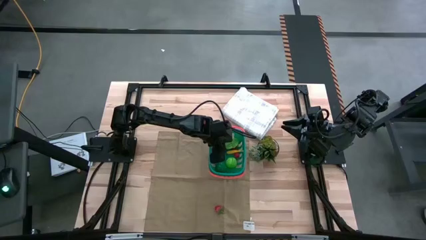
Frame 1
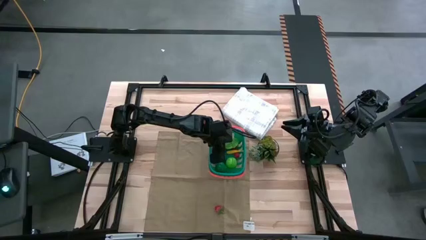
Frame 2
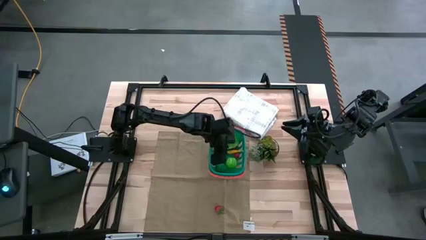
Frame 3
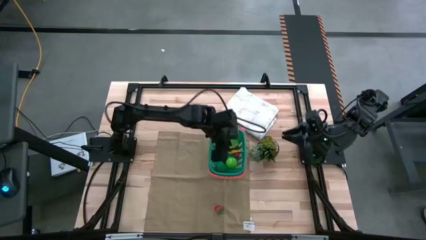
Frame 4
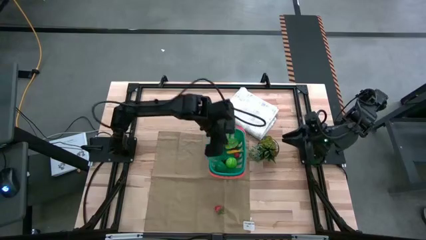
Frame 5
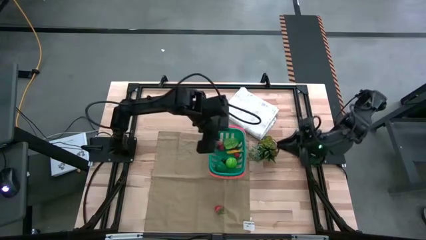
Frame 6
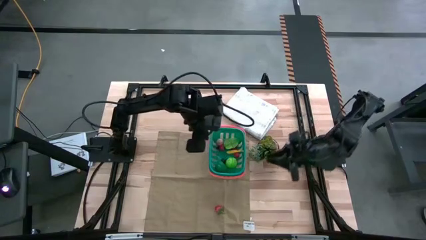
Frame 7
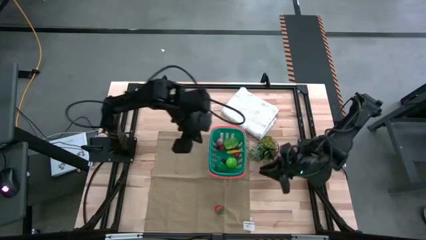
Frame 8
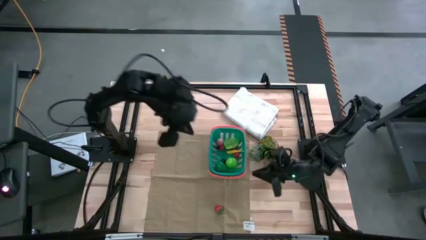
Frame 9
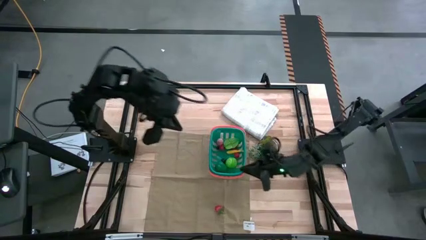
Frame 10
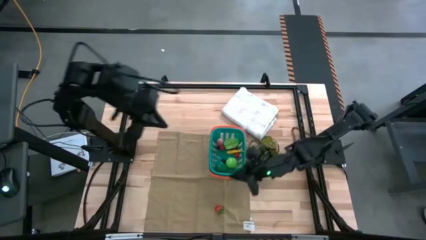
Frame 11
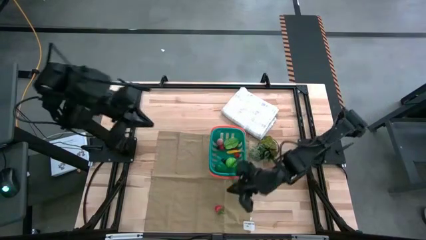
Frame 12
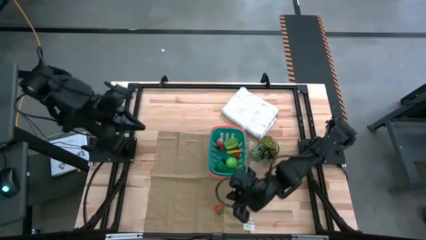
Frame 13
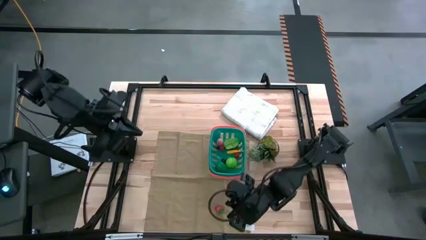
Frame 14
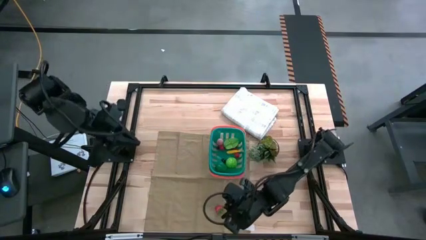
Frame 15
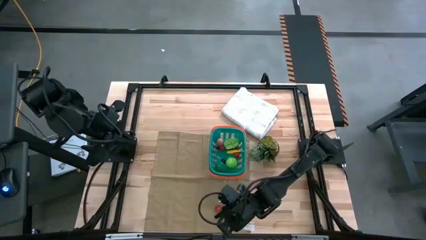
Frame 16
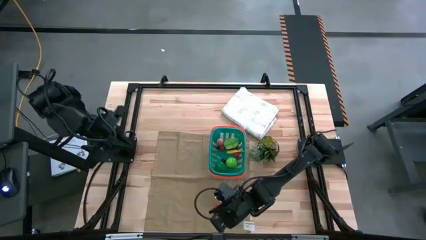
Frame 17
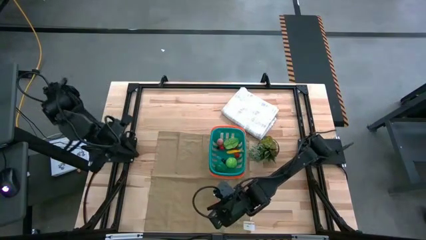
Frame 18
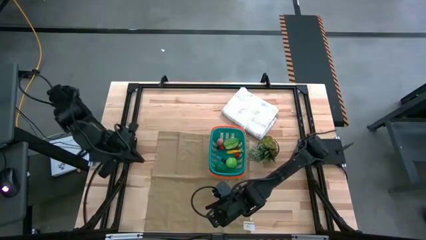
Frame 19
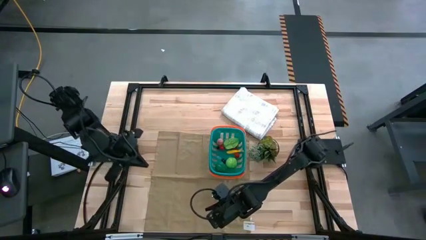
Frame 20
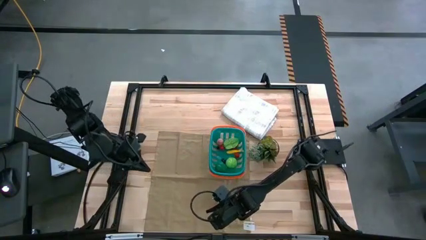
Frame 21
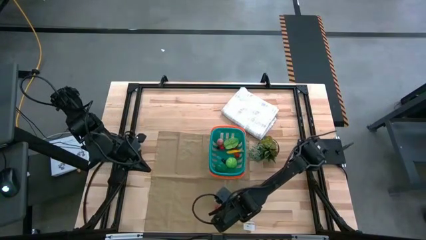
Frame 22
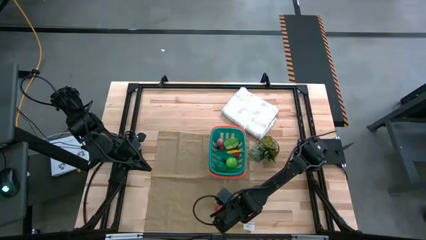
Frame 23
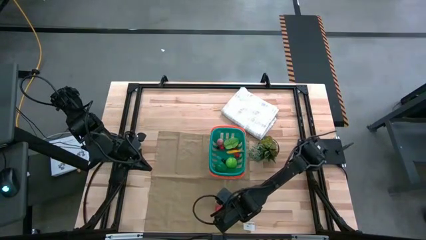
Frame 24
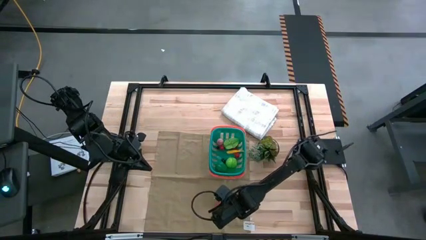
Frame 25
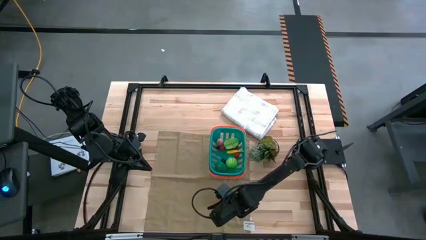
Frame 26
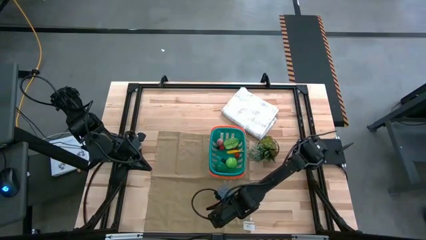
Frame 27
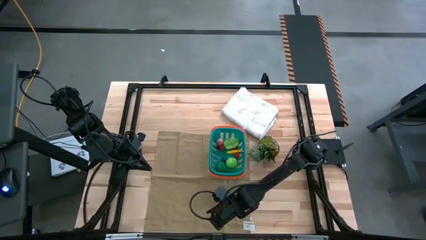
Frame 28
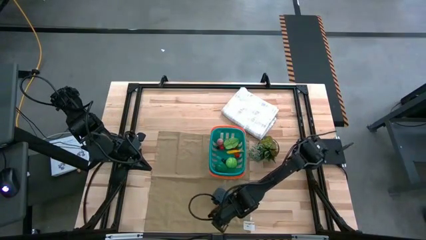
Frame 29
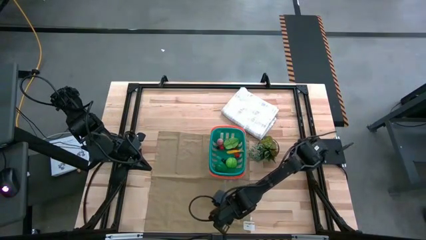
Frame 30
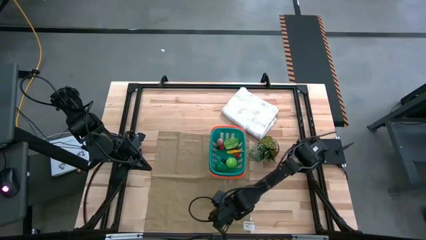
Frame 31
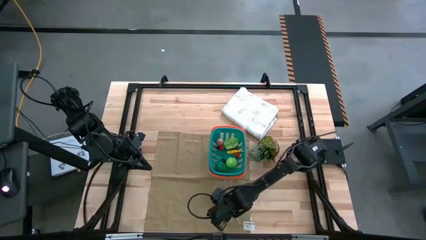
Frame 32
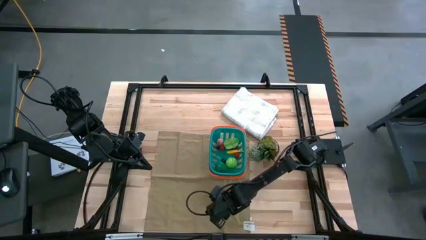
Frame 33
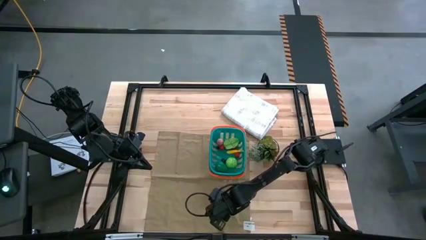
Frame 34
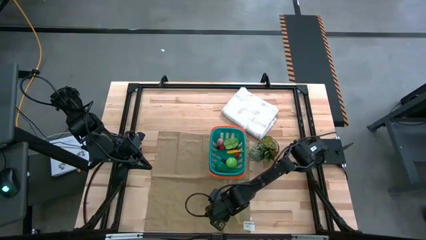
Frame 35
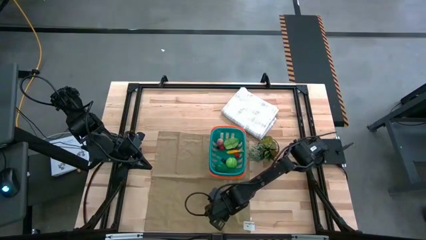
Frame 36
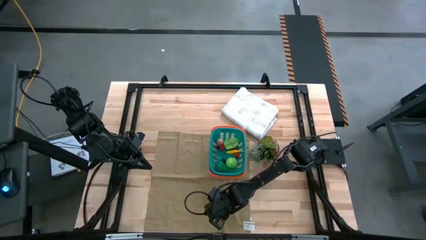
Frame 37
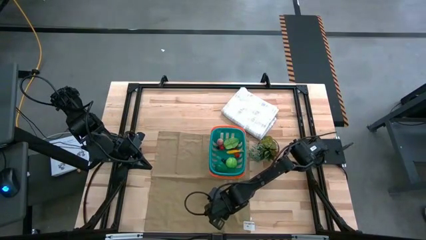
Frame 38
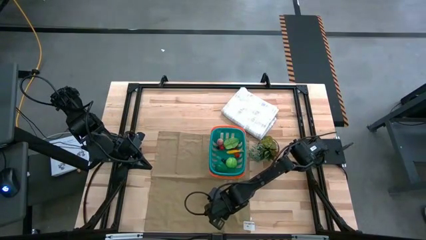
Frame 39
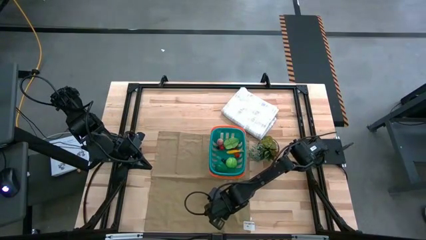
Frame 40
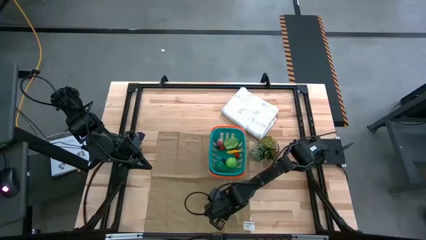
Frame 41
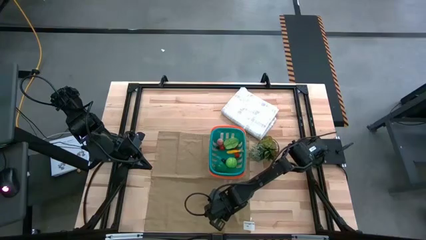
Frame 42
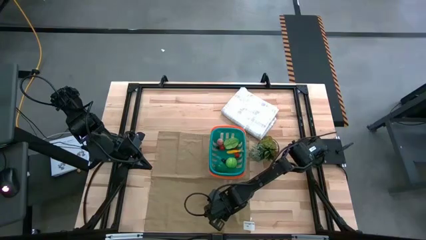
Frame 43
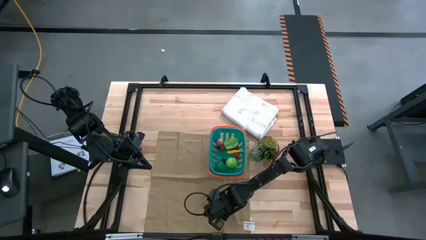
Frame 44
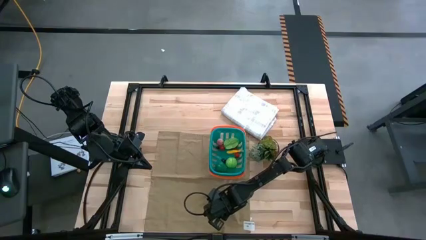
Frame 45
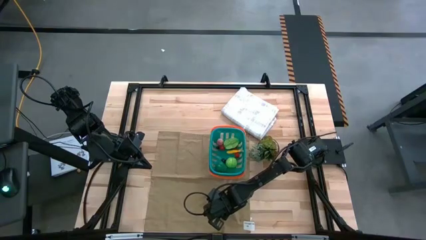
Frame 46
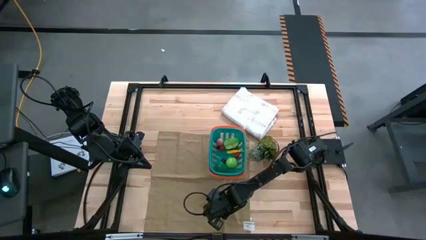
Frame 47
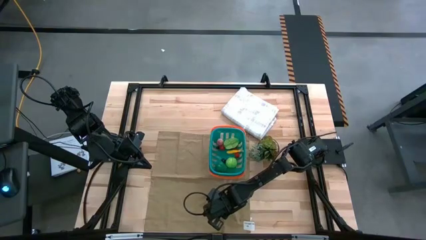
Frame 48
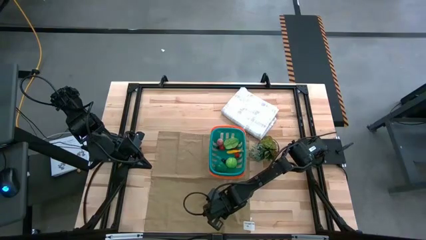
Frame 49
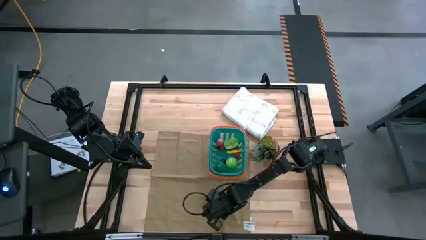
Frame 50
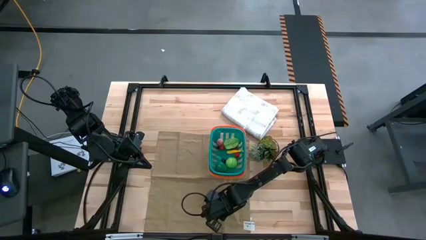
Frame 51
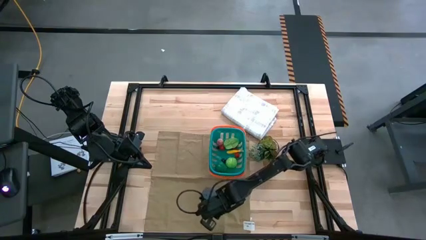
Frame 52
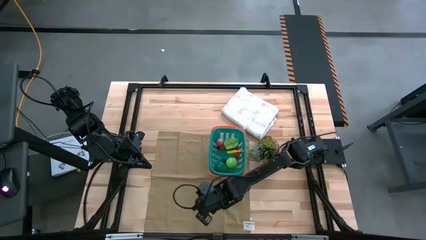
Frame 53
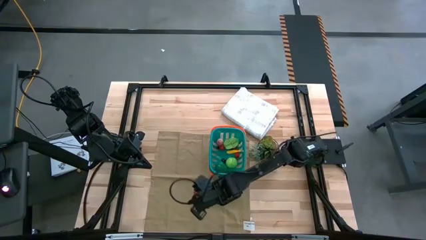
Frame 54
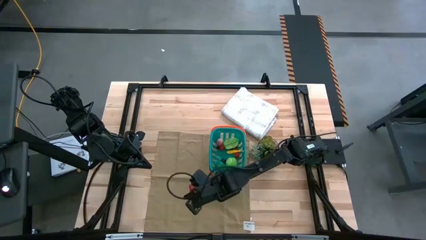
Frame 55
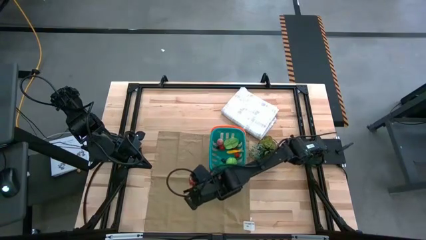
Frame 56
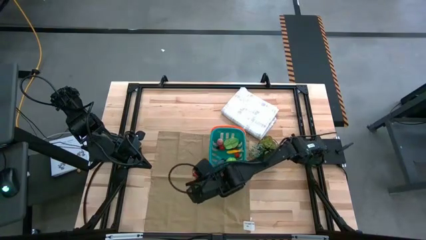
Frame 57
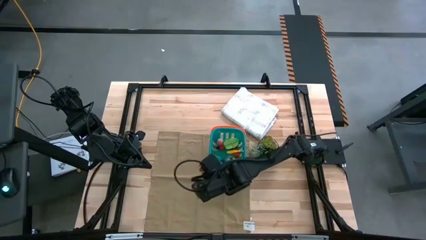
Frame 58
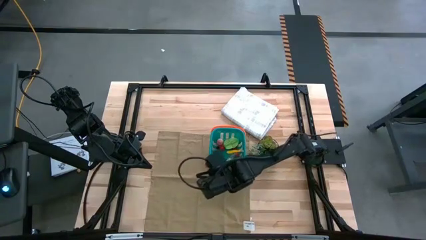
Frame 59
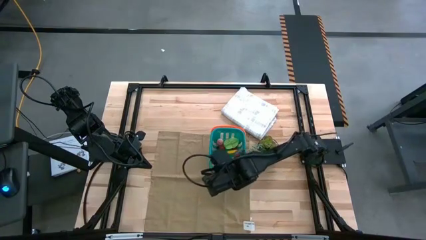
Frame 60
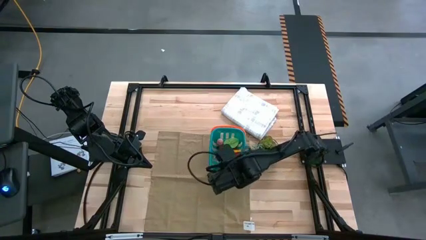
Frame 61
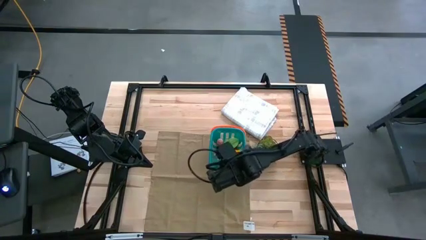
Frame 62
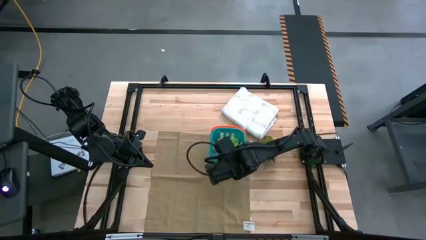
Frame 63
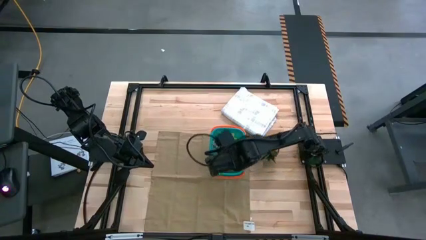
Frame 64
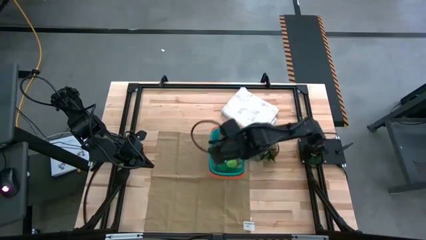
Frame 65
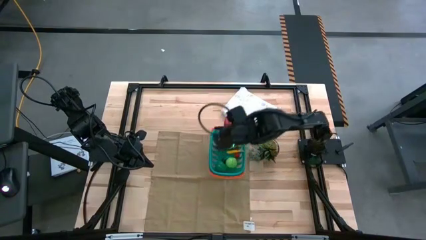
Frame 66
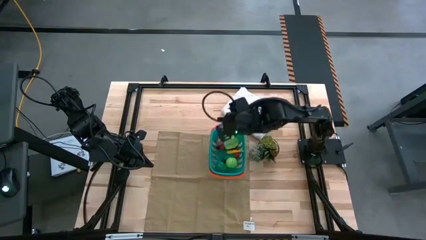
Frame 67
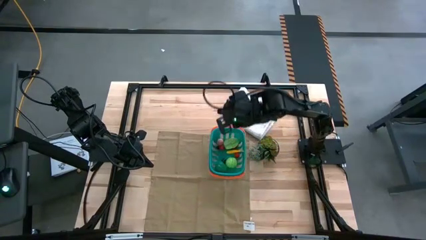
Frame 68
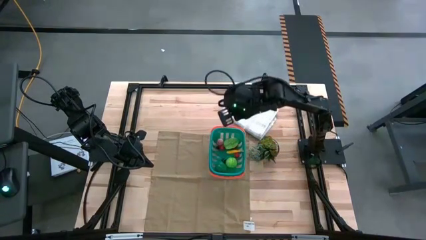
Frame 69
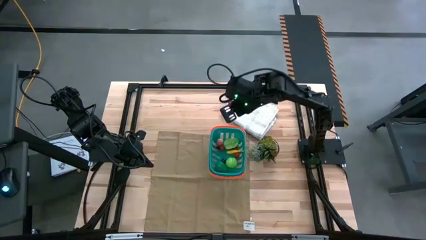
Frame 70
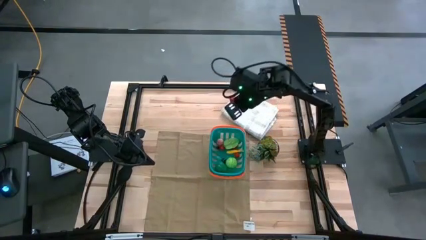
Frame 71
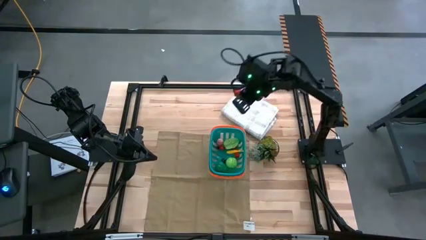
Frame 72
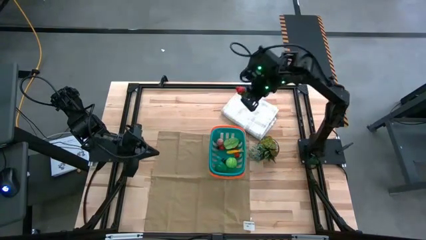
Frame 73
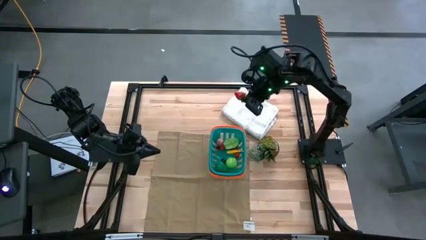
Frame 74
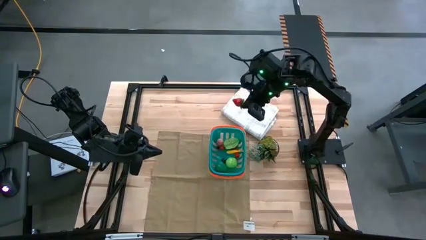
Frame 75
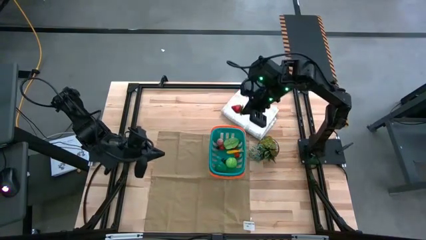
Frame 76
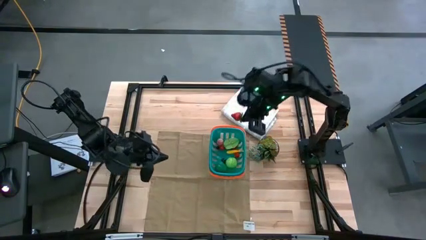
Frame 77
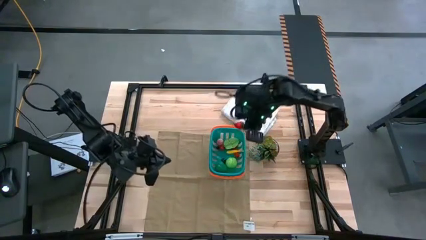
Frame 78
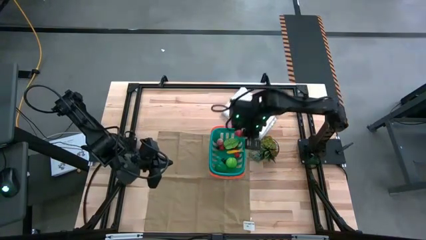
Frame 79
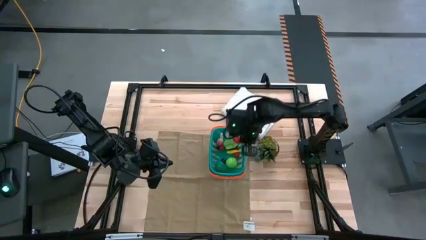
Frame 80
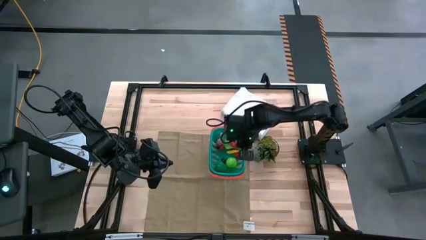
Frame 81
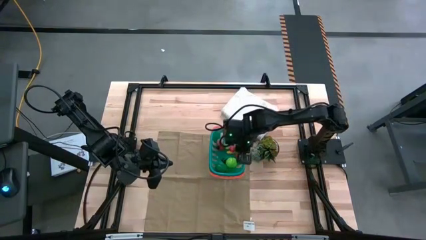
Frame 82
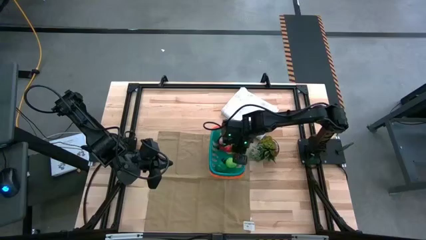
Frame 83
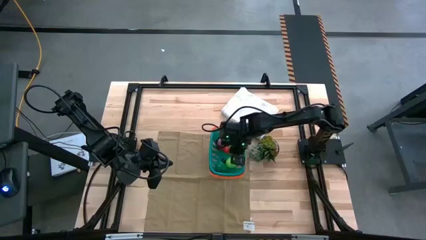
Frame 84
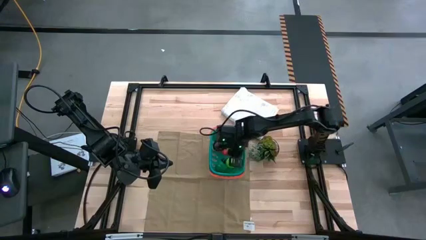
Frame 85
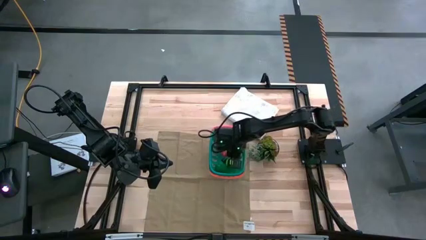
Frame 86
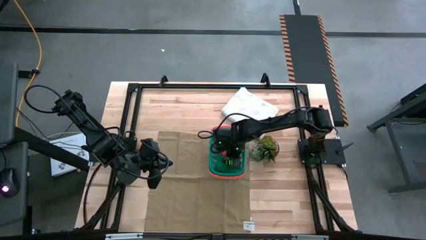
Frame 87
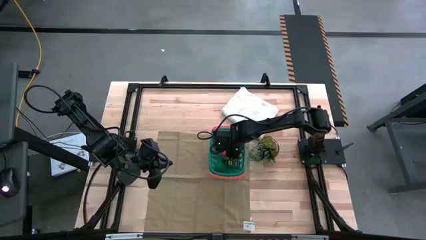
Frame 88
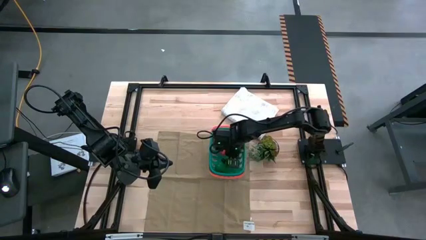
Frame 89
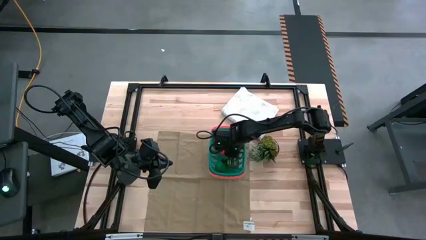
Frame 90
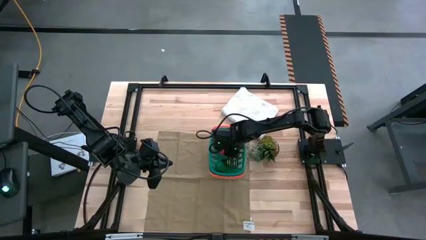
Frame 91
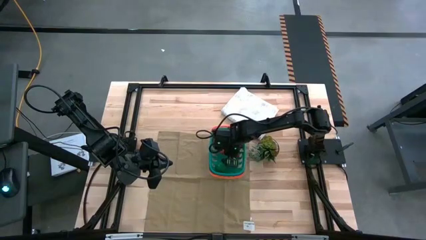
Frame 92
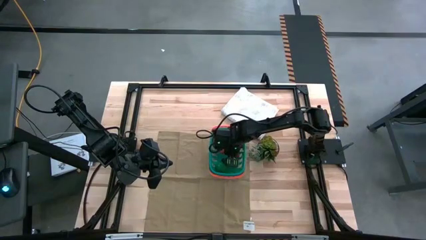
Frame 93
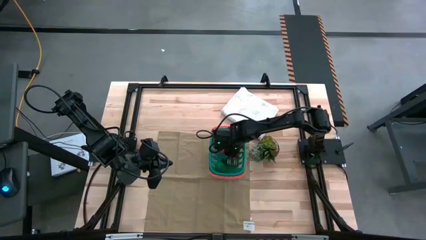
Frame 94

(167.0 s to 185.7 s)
Task: Pick and placing Produce into tupperware
Put the red strawberry into the basket
